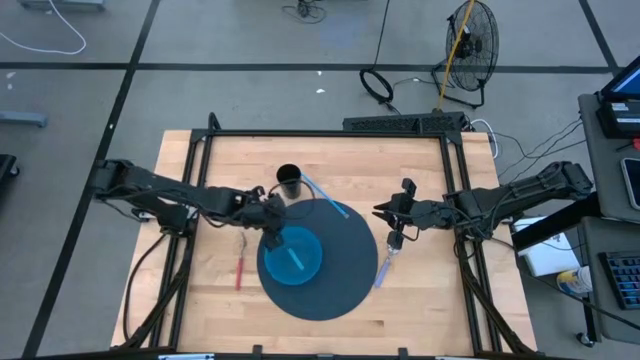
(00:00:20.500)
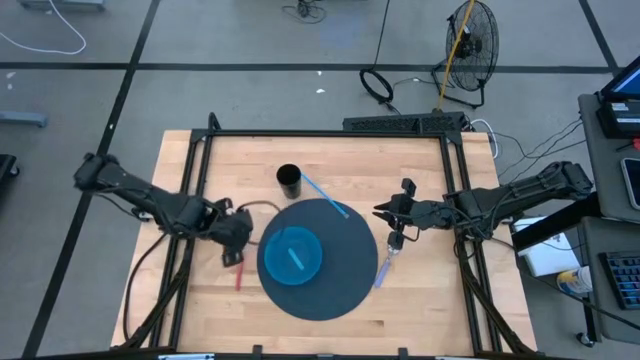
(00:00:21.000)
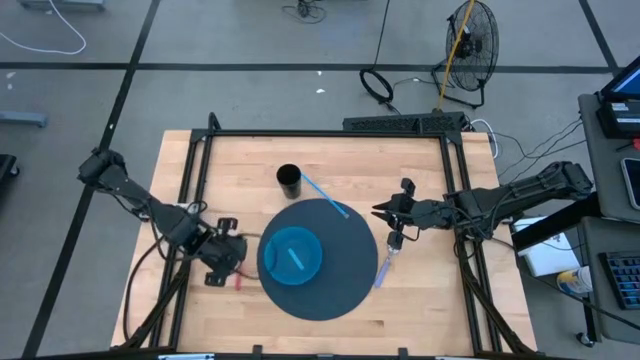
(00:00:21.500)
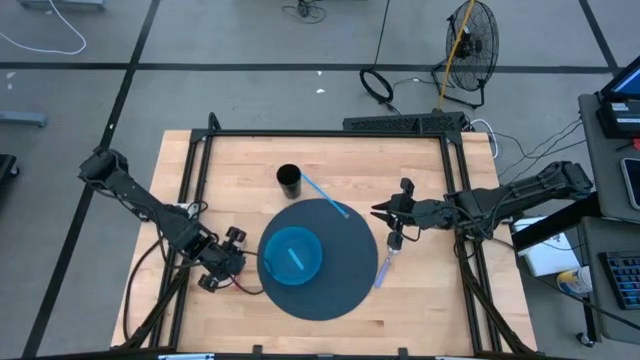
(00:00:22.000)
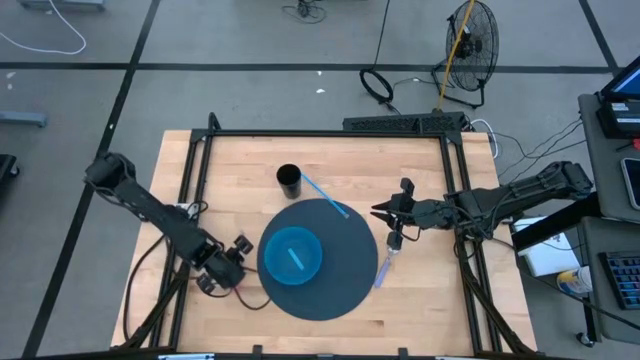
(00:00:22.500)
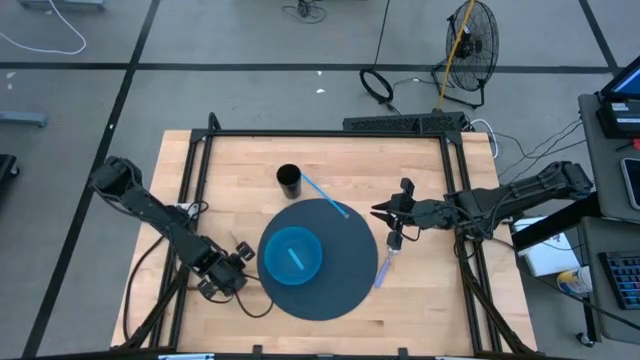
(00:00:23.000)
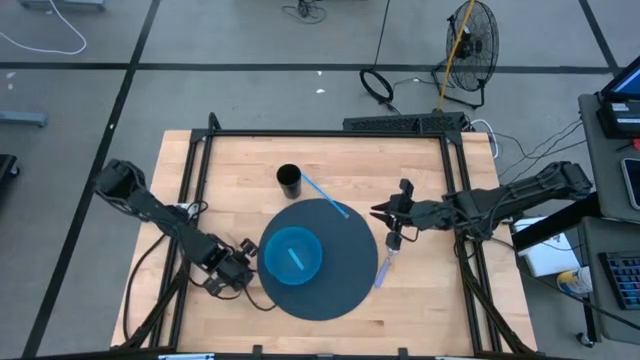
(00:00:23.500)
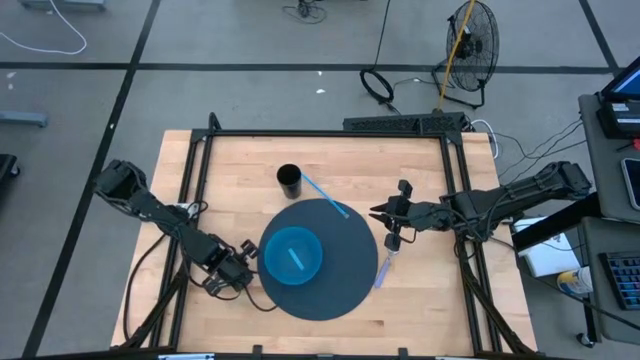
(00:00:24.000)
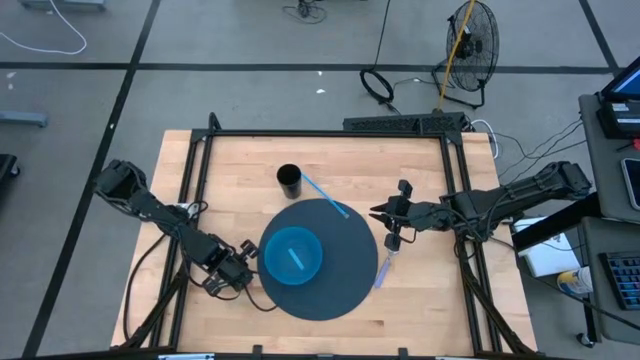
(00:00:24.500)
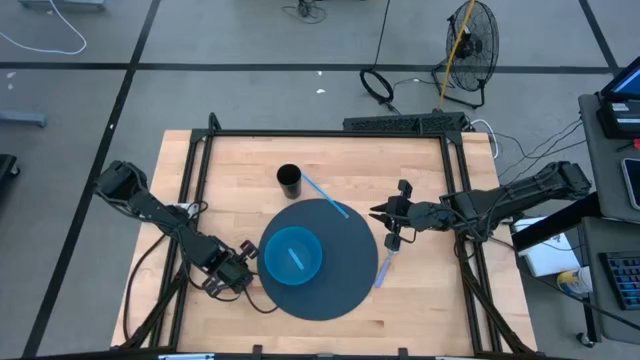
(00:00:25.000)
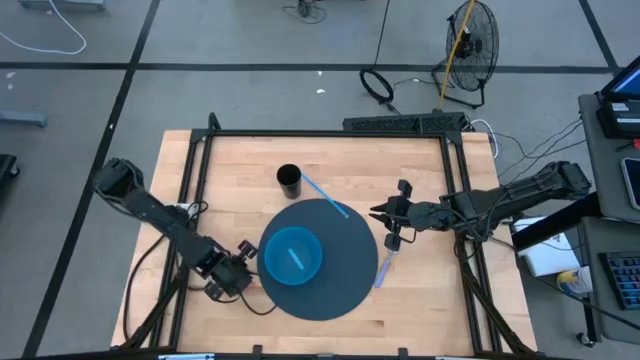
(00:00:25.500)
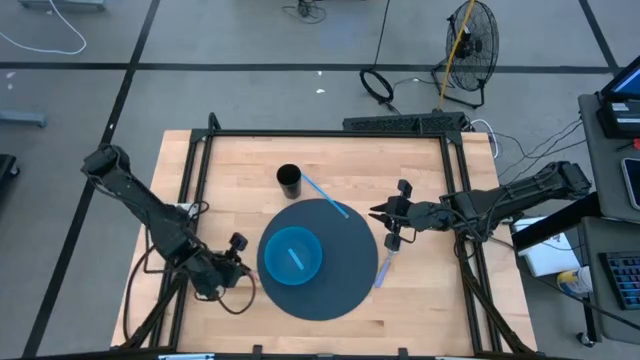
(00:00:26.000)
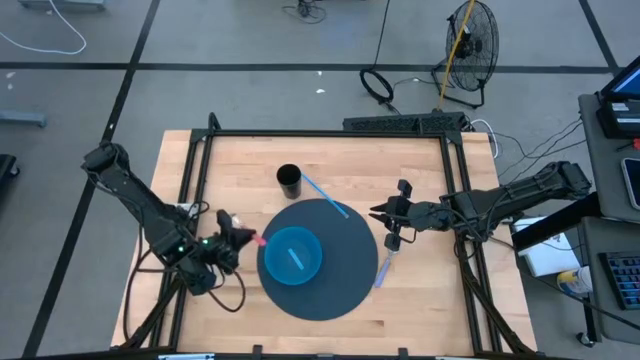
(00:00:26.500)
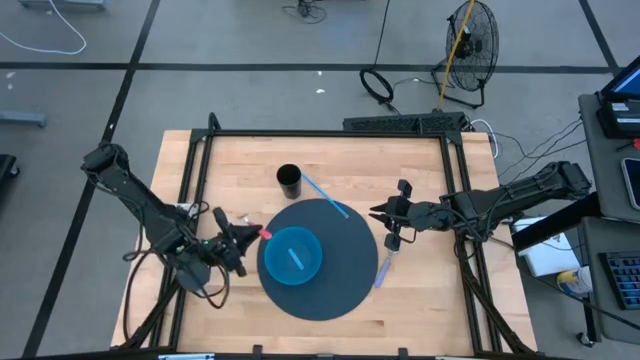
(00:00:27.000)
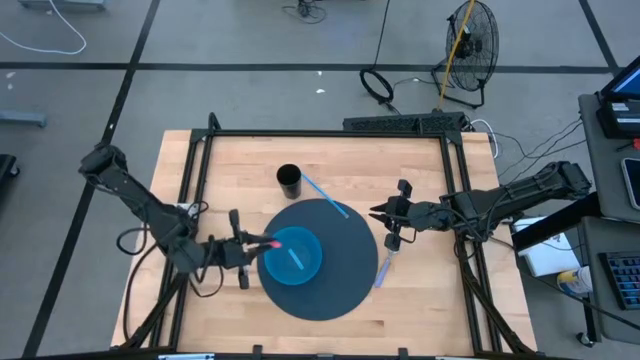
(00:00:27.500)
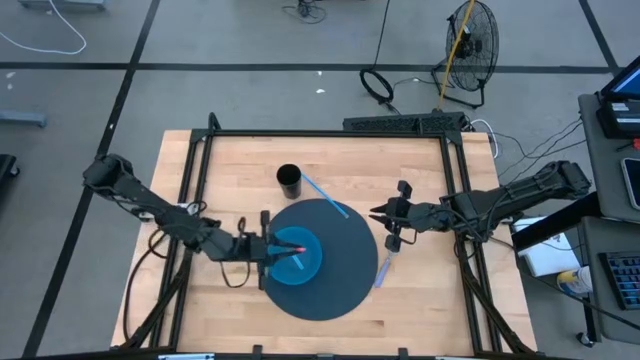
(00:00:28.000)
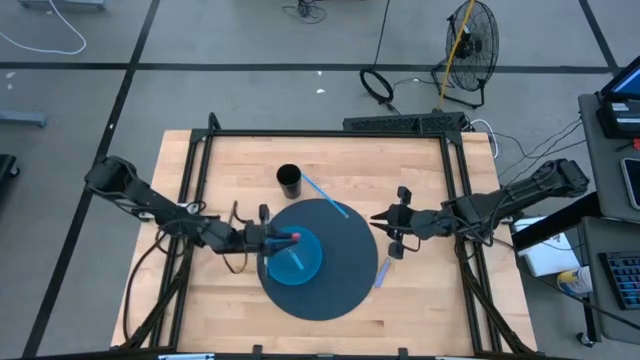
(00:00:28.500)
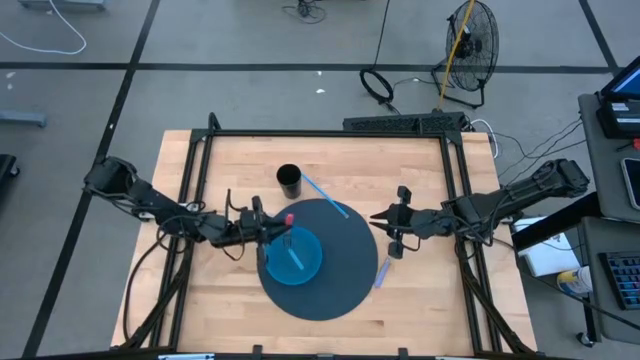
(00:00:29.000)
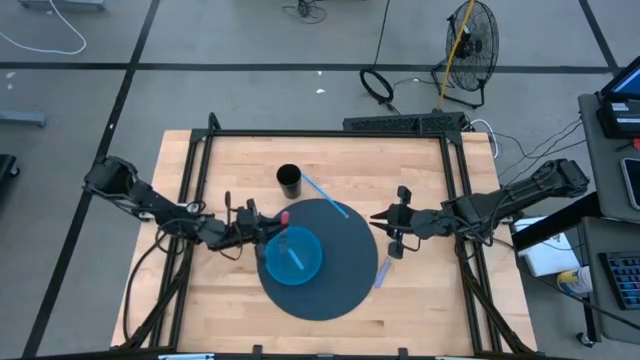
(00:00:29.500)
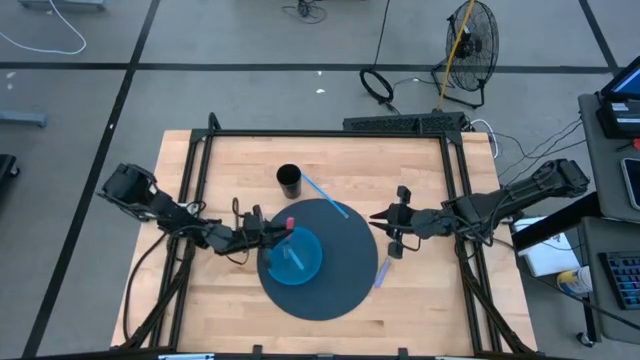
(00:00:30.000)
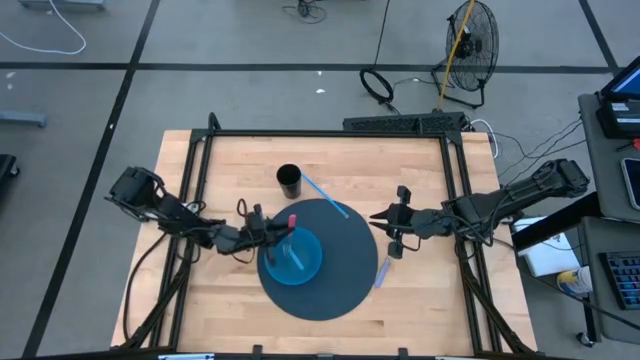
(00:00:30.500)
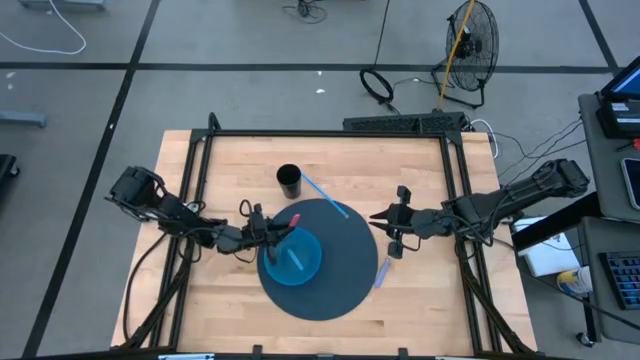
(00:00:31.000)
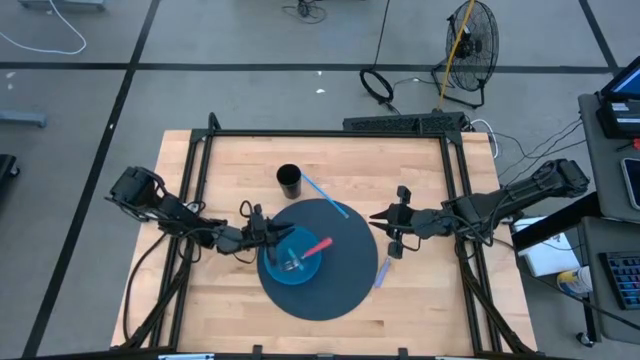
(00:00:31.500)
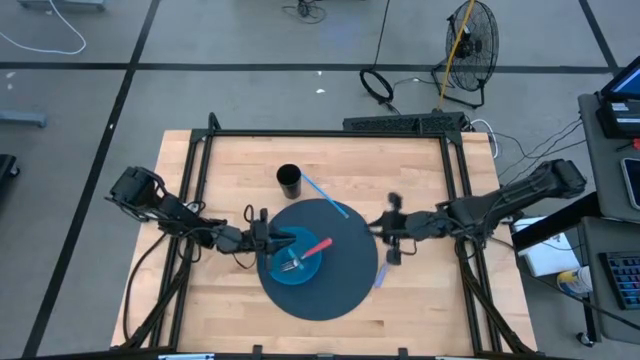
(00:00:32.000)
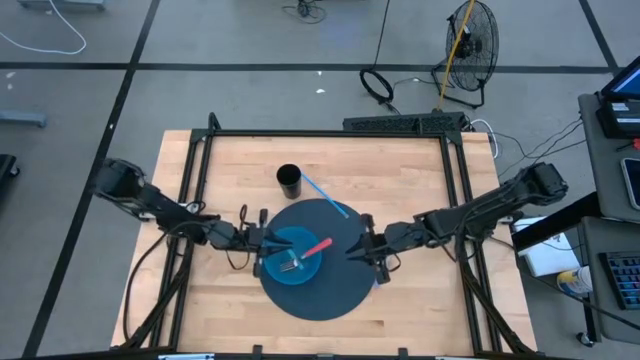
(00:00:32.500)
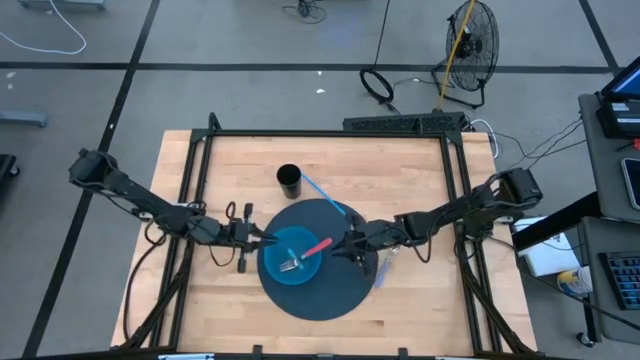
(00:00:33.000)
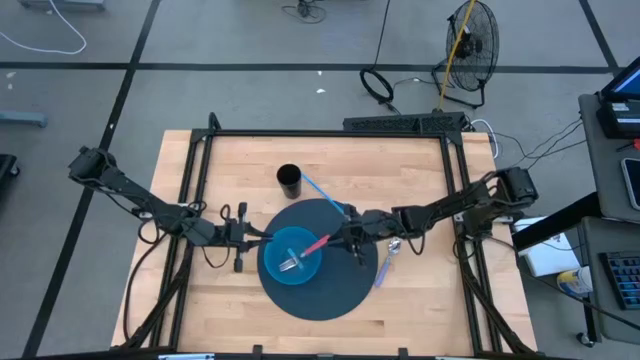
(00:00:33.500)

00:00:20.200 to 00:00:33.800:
Task: Pick & Place Utensil
Put the pink fork into the blue bowl on the blue mat
